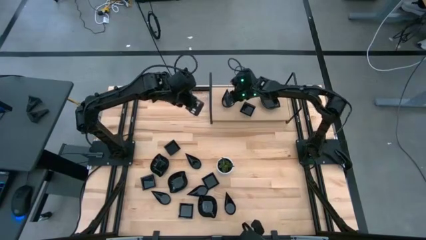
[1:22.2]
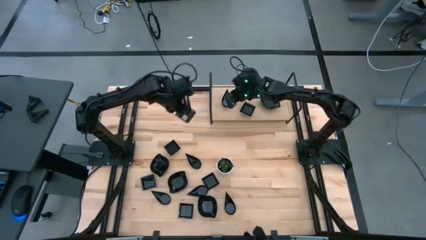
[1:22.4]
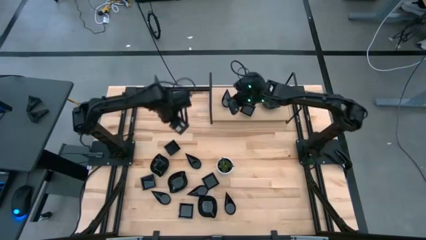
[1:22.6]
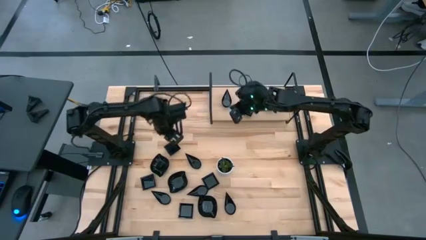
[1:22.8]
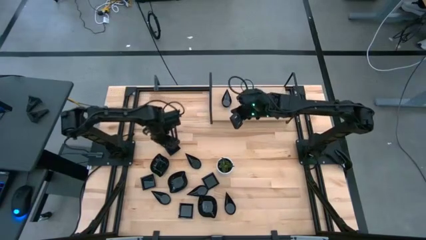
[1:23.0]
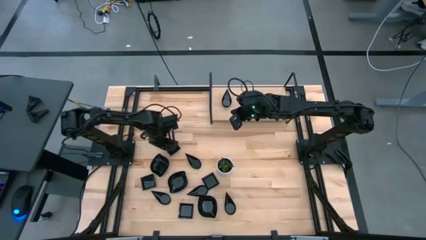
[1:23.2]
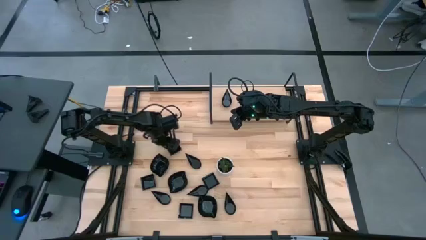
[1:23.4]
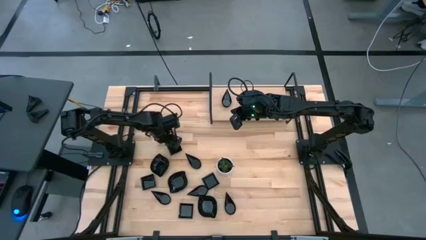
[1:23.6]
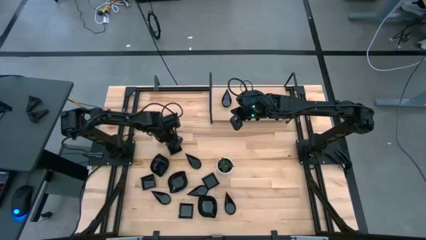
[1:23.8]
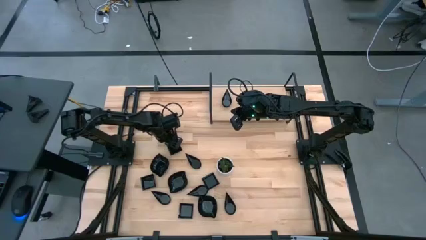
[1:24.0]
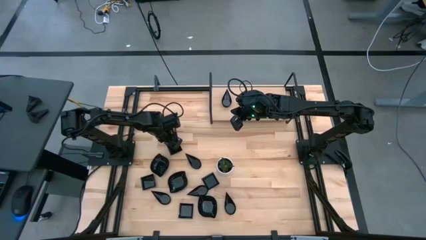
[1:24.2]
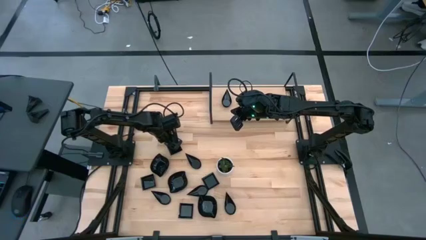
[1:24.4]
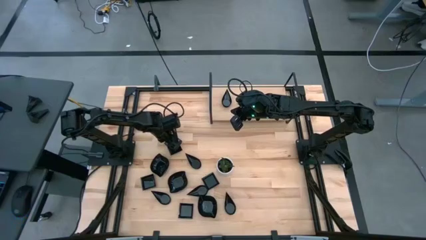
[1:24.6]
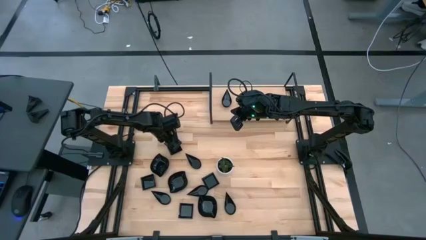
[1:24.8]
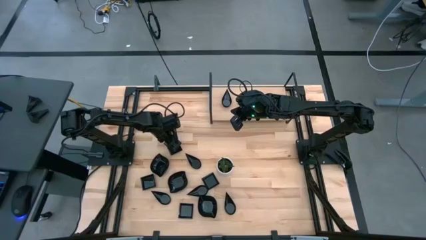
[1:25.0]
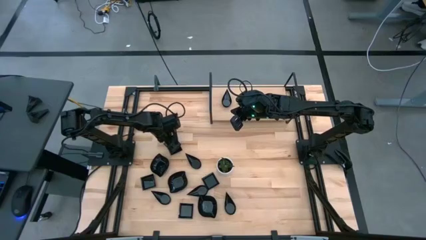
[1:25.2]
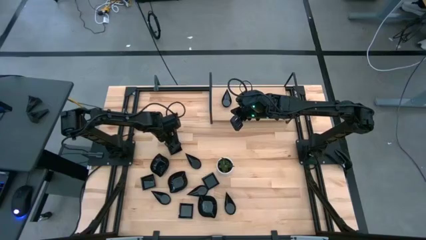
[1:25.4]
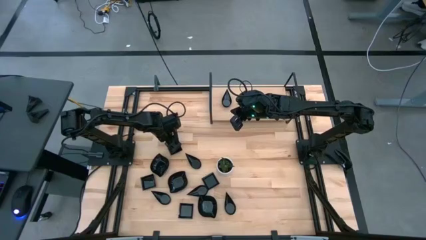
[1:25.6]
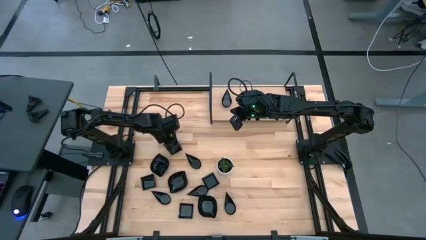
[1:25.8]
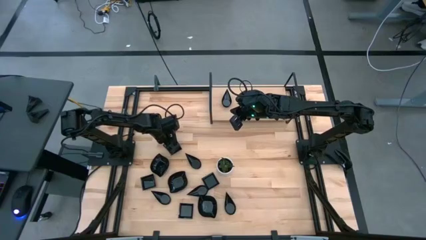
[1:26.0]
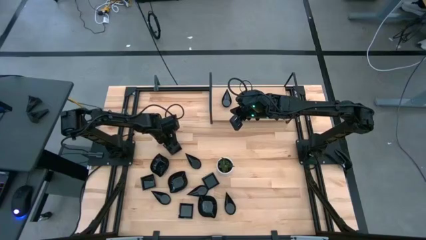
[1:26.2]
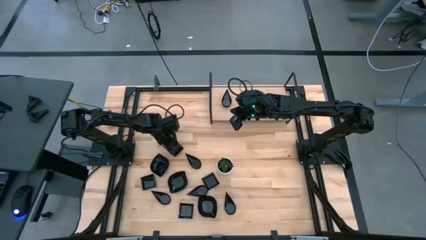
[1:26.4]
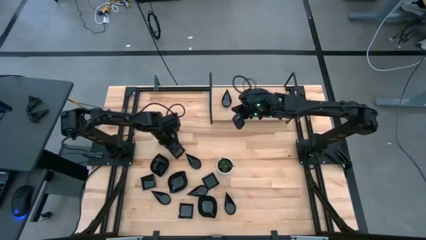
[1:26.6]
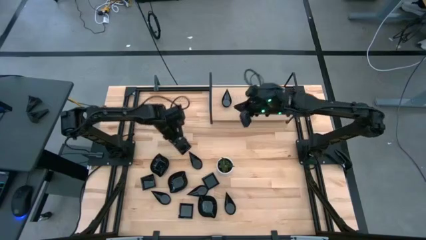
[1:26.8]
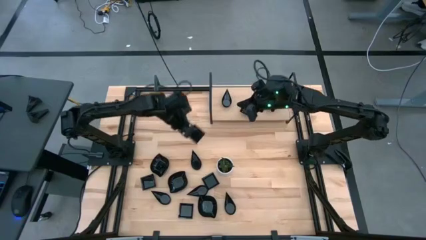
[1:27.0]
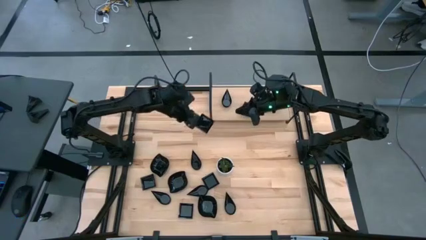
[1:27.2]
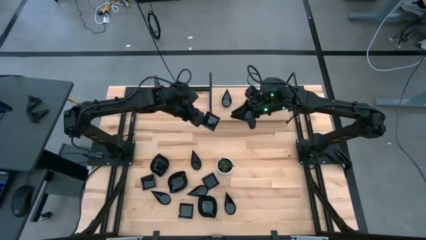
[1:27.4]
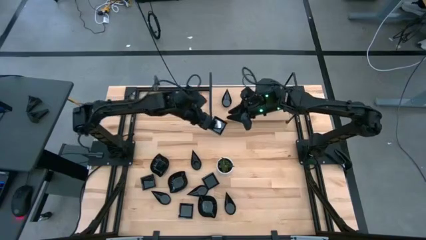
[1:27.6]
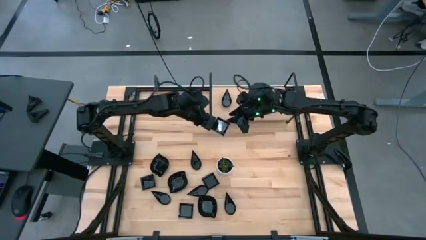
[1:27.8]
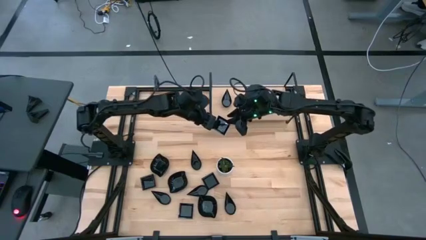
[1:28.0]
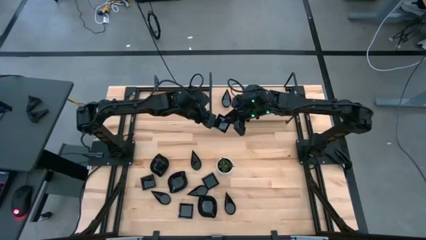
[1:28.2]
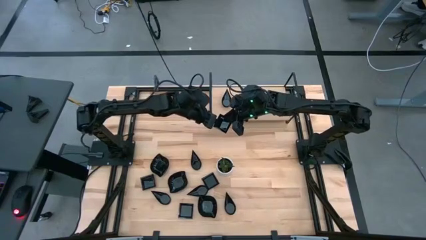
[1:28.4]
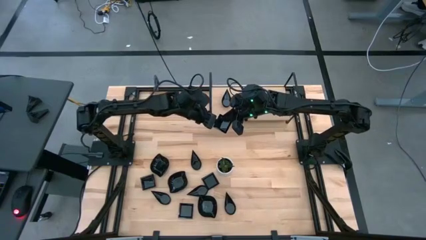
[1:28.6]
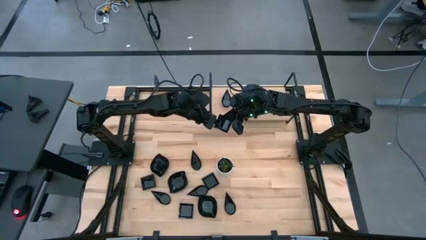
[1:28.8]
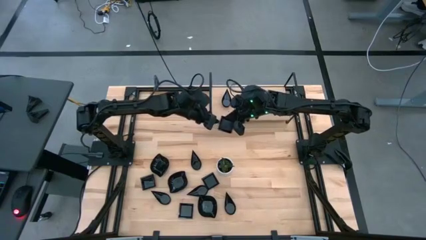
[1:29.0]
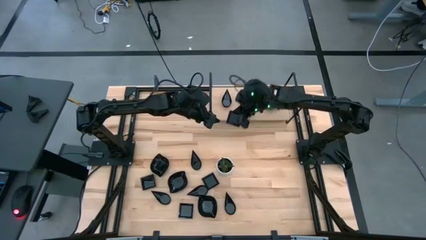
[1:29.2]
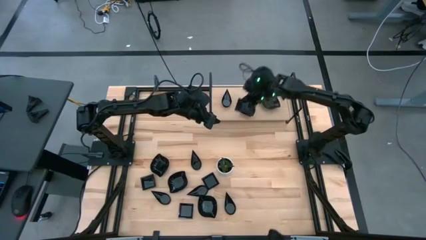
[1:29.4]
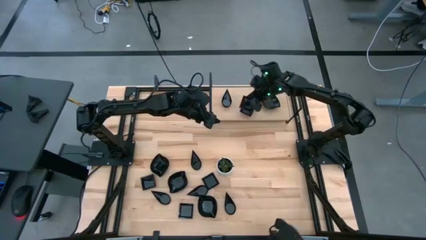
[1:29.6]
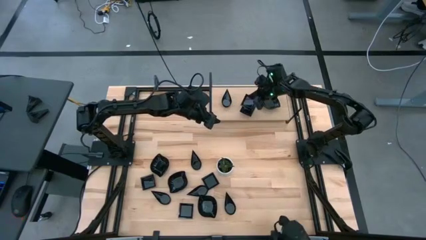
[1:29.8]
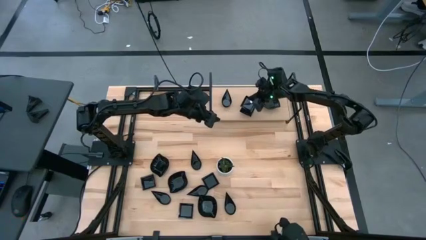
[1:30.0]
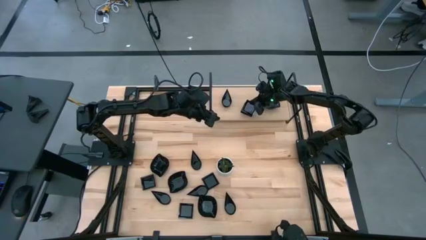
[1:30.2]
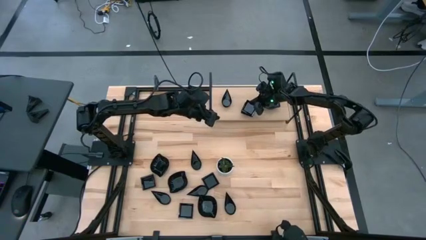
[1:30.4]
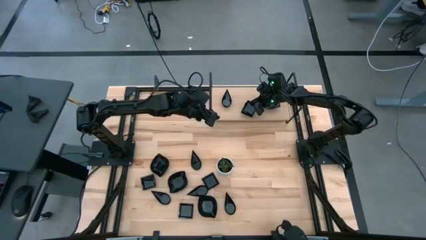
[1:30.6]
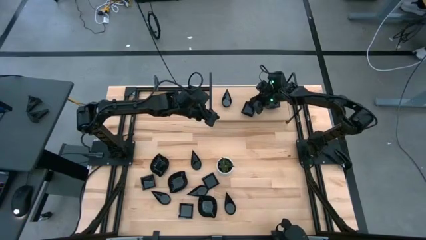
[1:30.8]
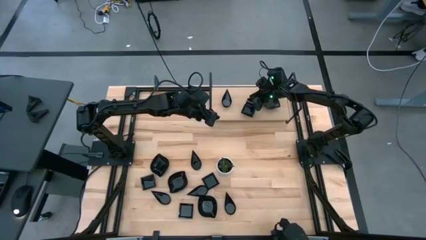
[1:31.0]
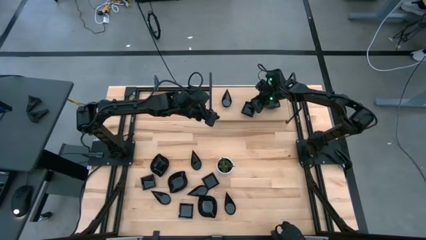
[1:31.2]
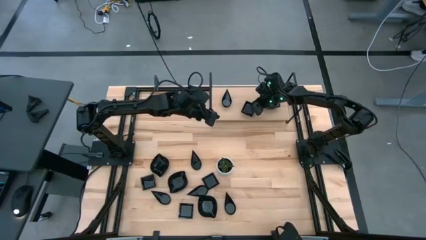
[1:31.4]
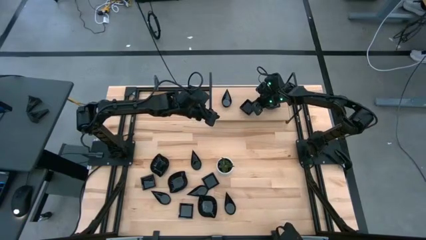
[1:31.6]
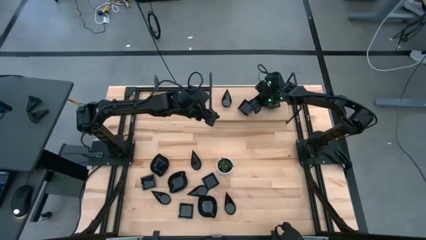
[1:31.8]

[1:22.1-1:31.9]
Task: Pick & Place Mini shaped plates
Stack the square plate on top of the square plate on the shelf

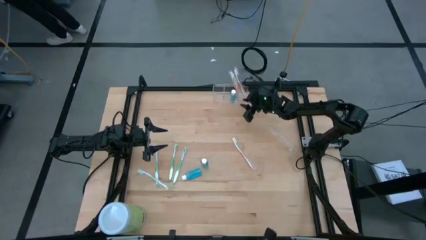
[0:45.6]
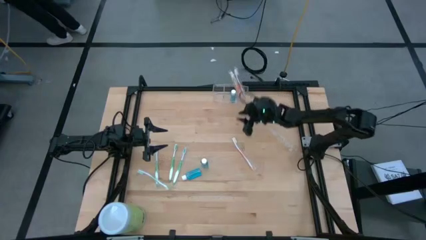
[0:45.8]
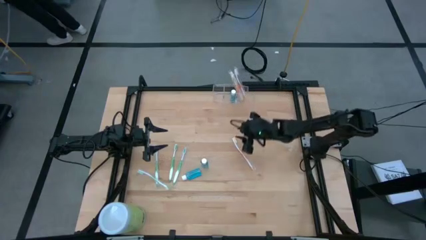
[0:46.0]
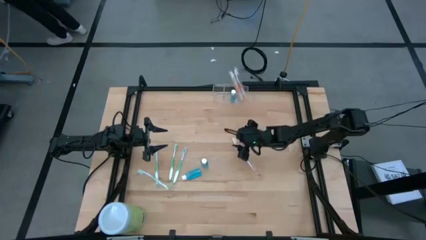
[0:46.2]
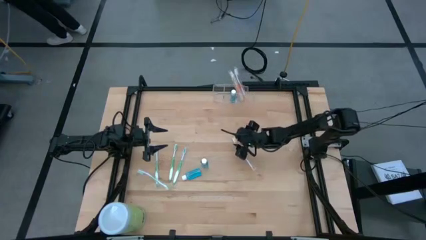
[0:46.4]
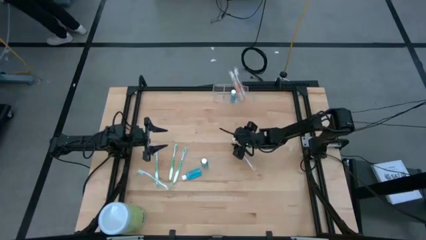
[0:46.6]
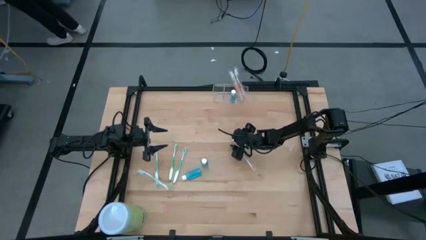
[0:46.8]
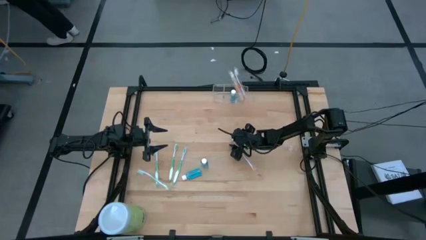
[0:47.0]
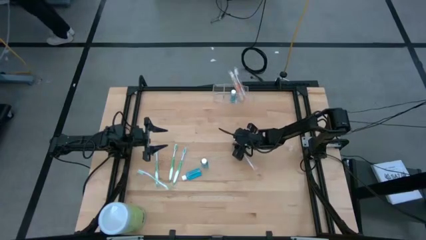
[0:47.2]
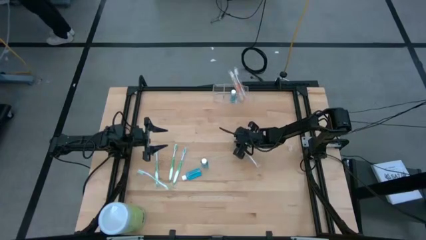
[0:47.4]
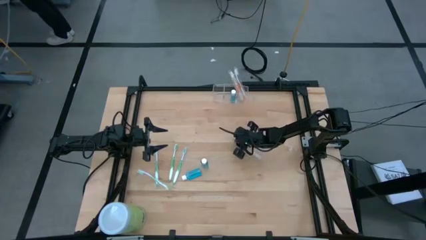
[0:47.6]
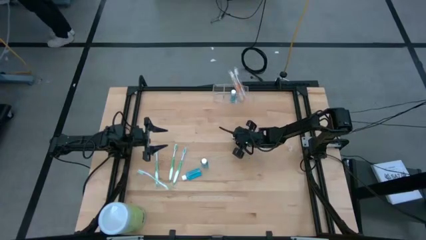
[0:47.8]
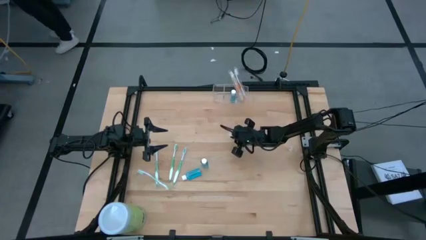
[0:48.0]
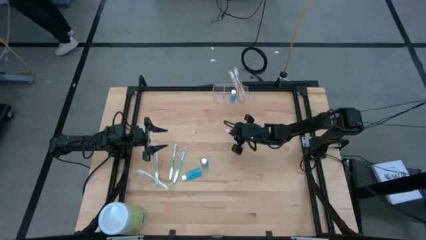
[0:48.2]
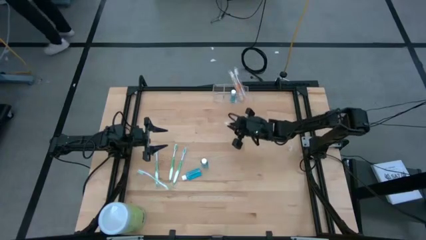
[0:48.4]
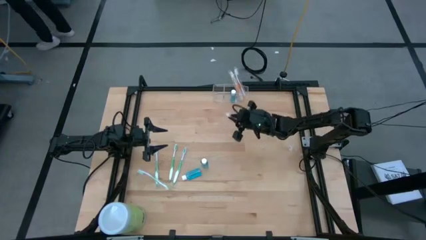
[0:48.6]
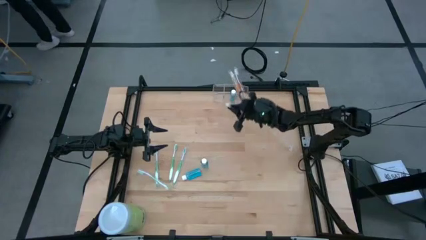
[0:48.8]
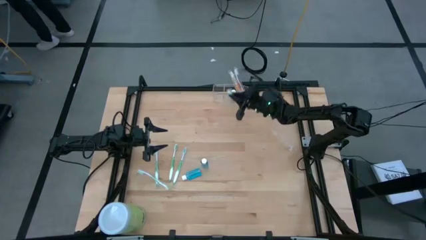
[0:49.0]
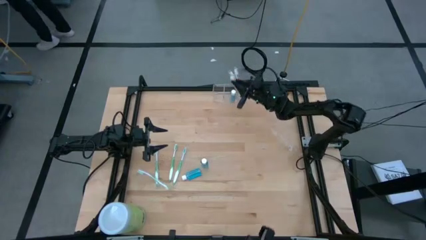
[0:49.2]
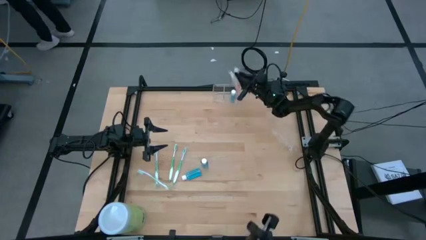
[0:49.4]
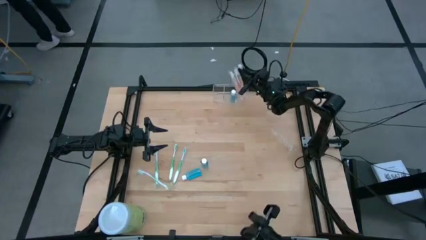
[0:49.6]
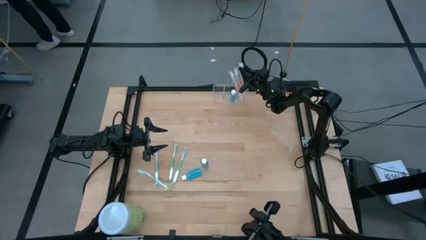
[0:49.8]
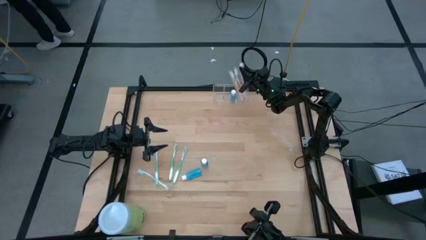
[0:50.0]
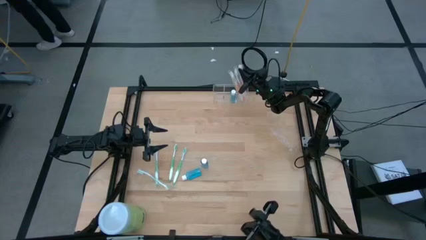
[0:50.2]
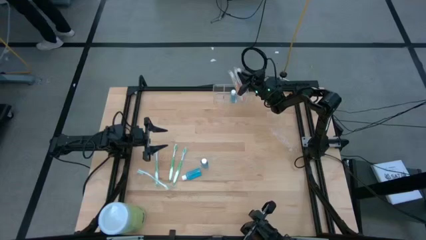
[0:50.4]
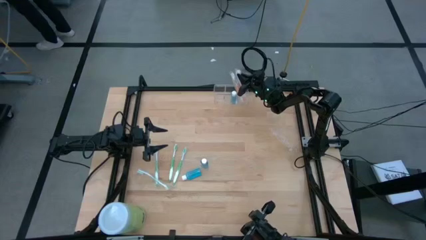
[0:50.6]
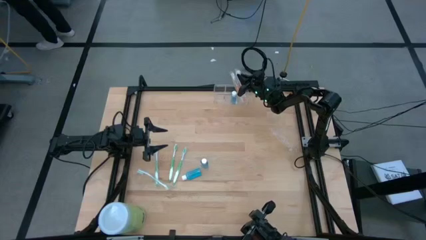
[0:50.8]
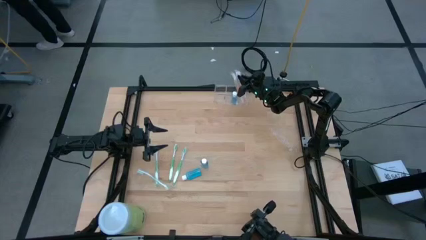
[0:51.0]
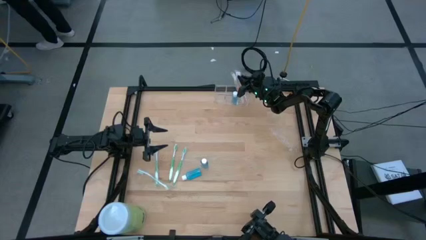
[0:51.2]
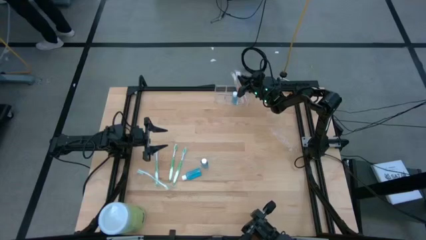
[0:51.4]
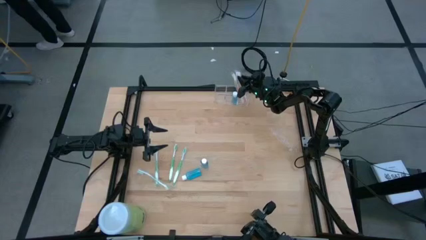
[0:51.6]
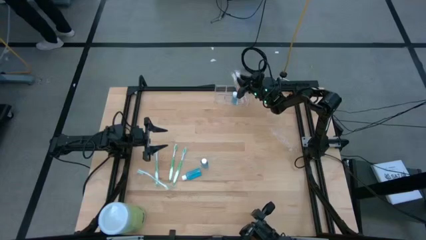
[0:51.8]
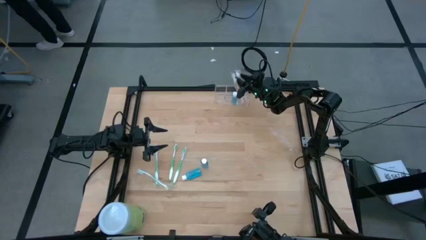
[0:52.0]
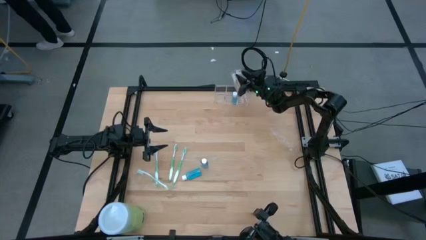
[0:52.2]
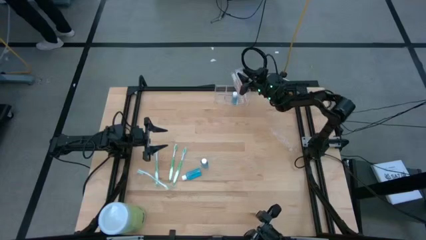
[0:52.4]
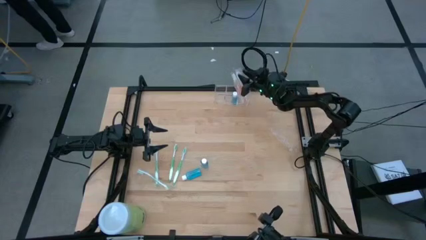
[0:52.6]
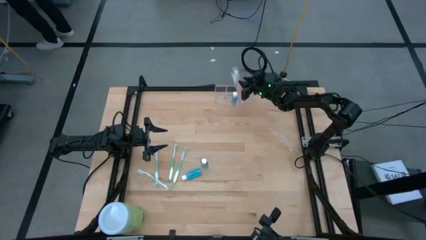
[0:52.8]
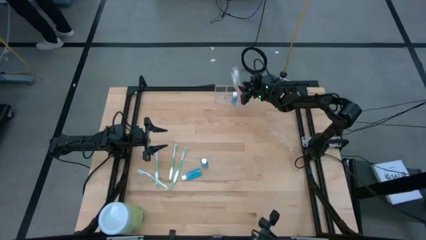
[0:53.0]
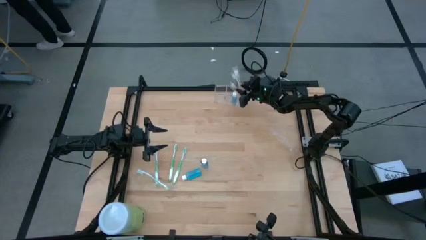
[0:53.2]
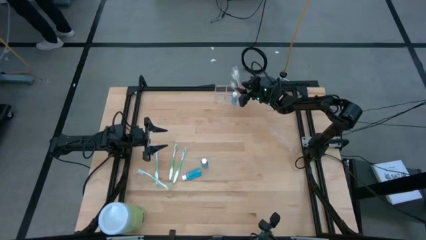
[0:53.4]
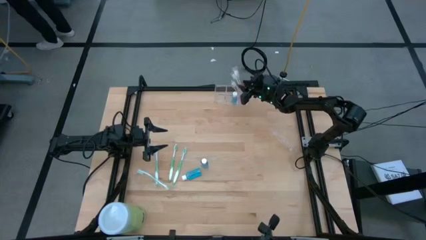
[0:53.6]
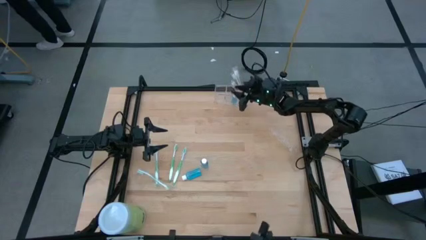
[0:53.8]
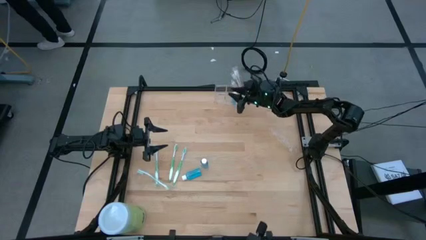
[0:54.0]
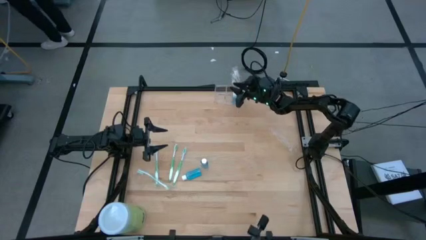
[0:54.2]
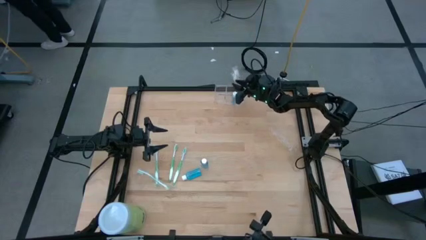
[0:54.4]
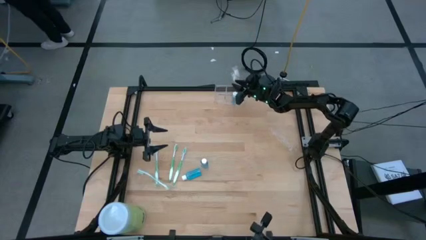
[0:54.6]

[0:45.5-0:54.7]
Task: Pick & Place toothbrushing station
Put the orange toothbrush into the transparent organizer
